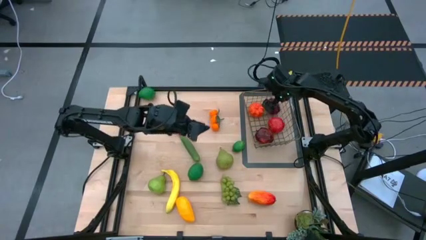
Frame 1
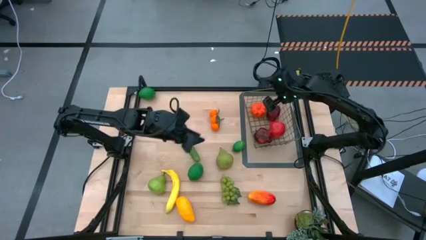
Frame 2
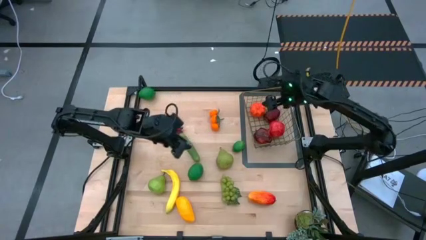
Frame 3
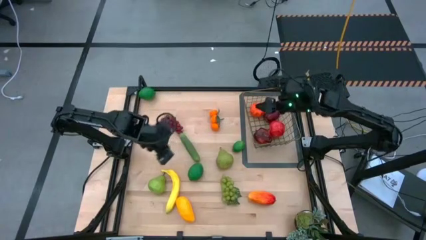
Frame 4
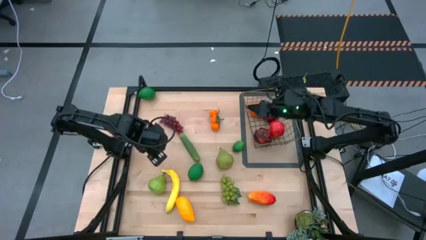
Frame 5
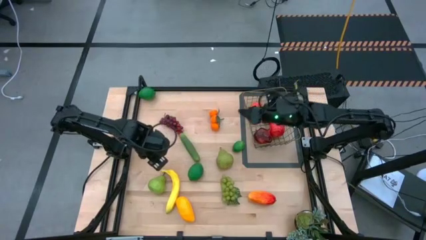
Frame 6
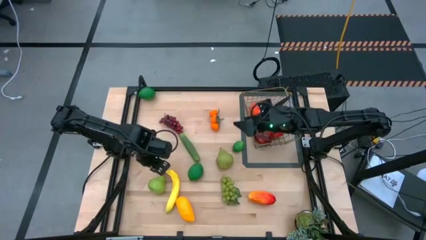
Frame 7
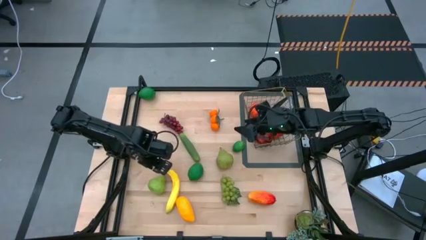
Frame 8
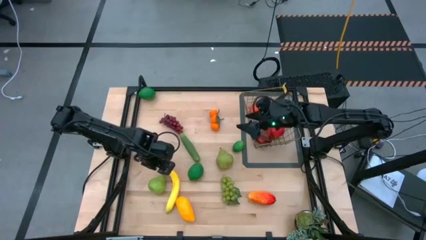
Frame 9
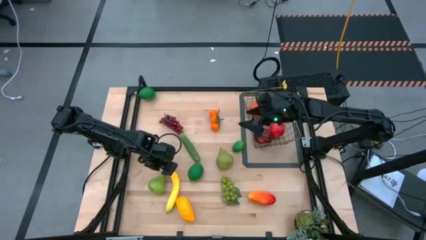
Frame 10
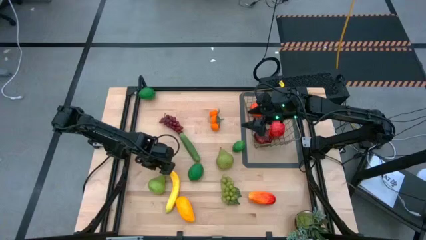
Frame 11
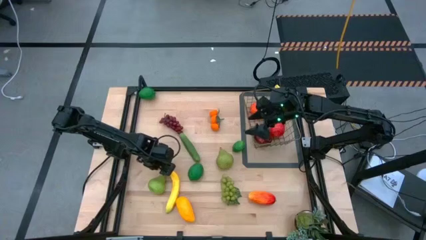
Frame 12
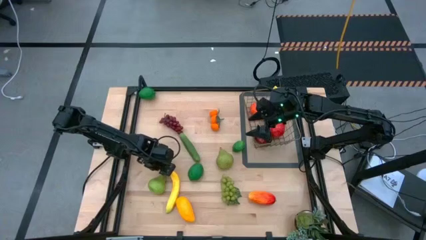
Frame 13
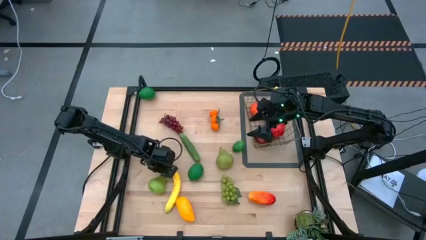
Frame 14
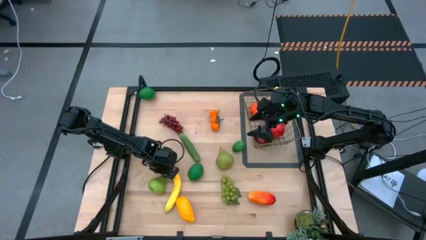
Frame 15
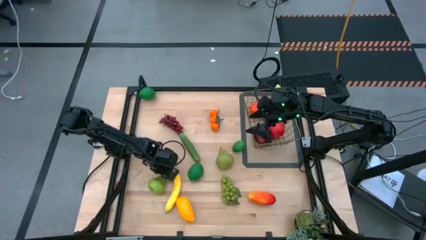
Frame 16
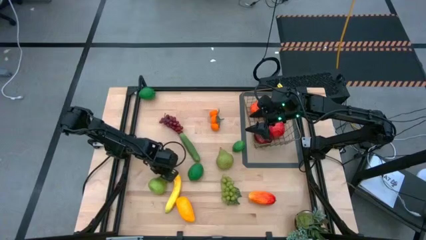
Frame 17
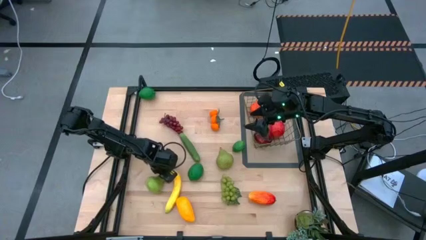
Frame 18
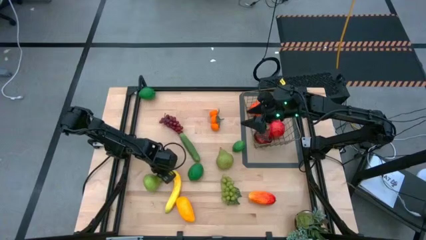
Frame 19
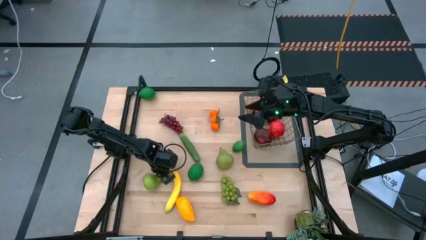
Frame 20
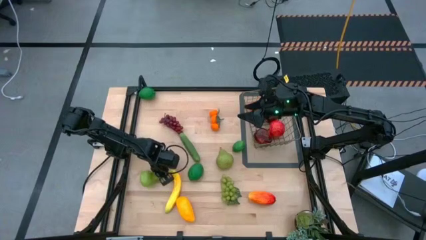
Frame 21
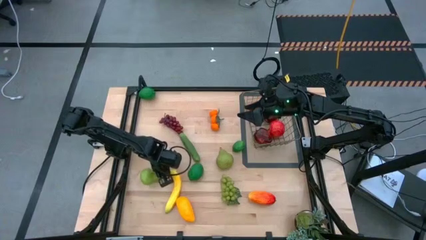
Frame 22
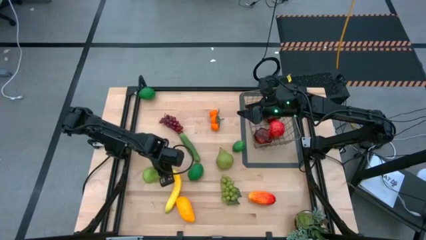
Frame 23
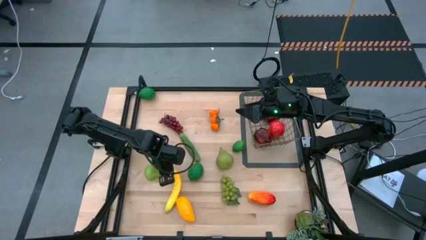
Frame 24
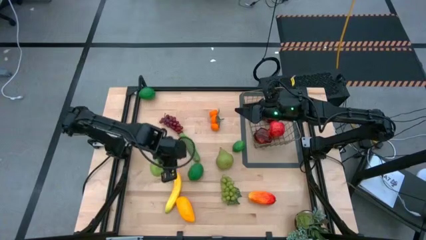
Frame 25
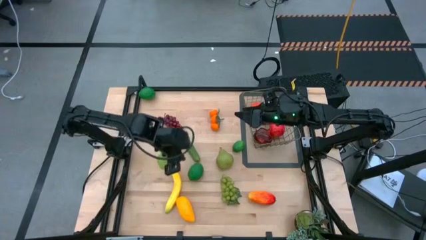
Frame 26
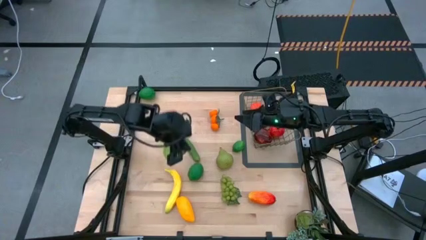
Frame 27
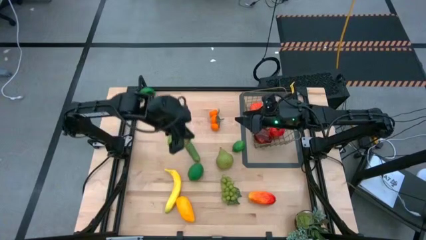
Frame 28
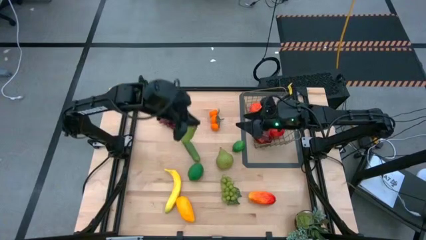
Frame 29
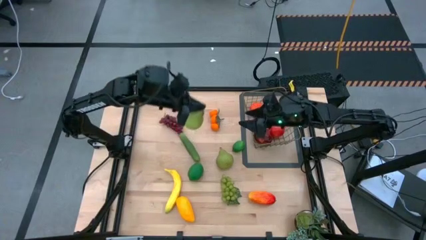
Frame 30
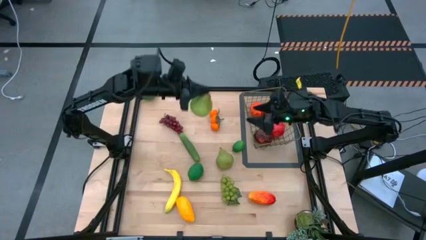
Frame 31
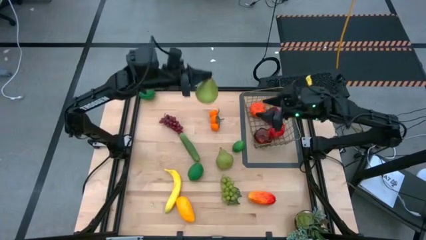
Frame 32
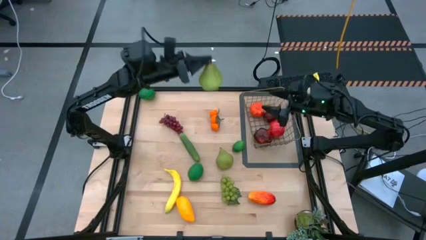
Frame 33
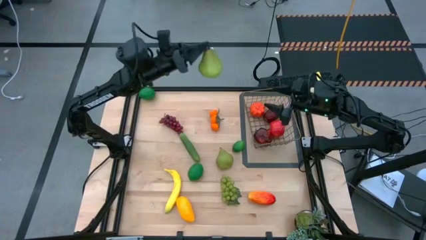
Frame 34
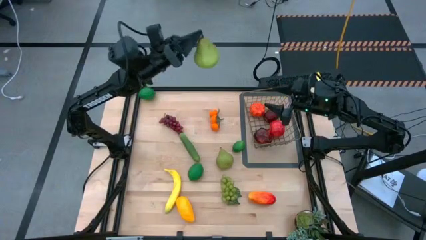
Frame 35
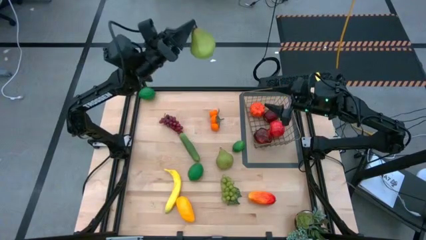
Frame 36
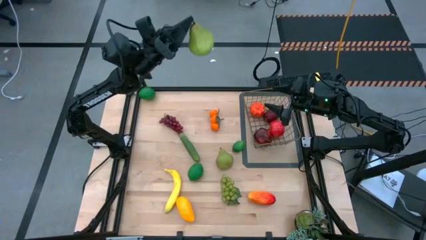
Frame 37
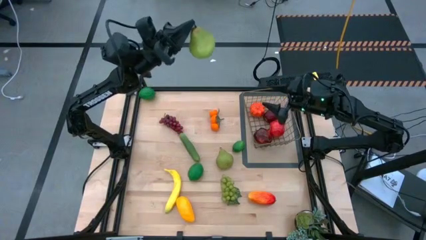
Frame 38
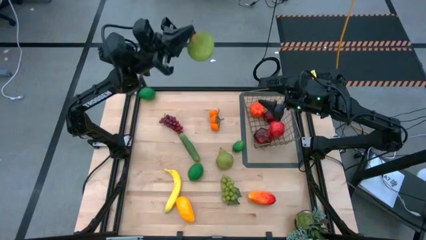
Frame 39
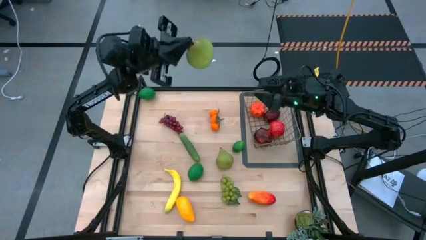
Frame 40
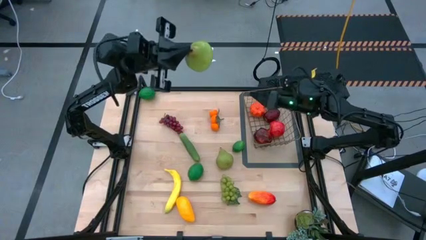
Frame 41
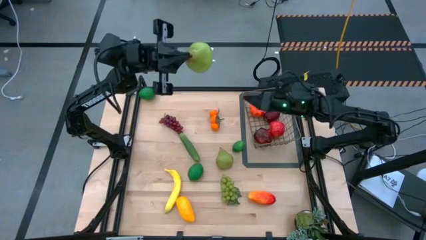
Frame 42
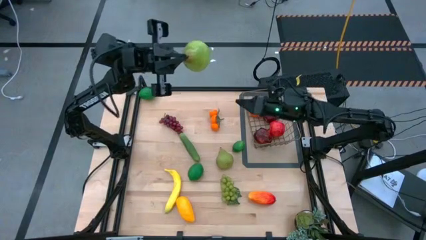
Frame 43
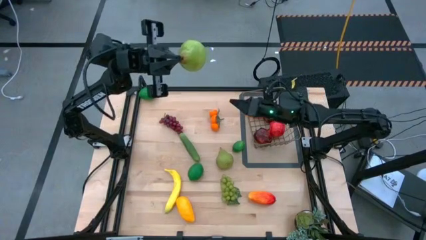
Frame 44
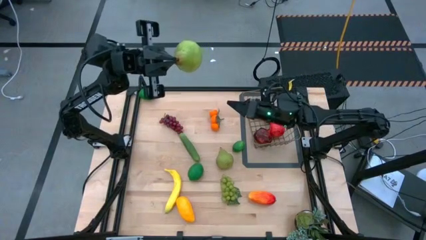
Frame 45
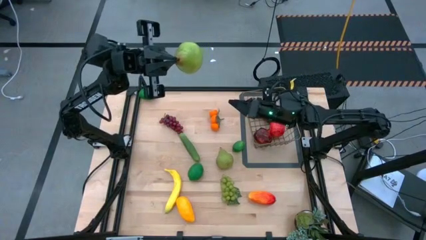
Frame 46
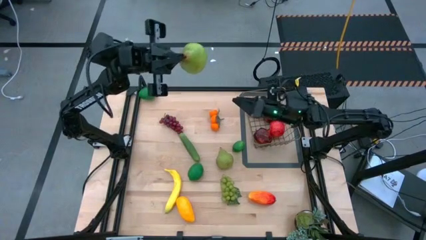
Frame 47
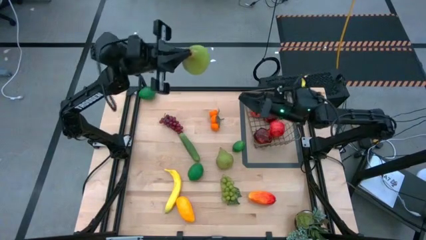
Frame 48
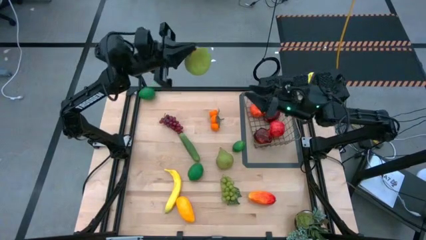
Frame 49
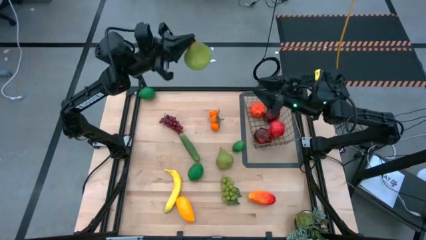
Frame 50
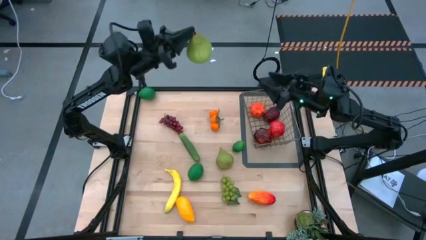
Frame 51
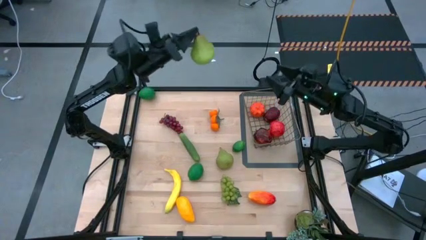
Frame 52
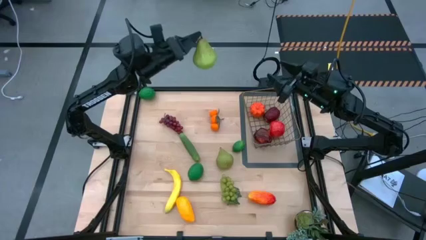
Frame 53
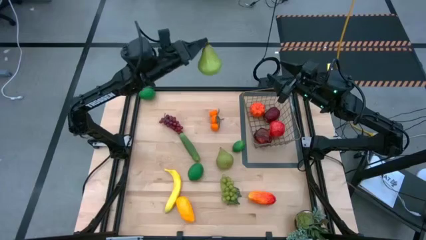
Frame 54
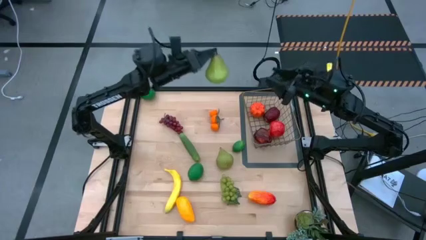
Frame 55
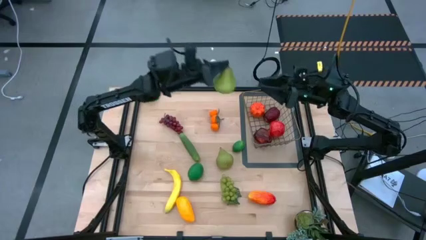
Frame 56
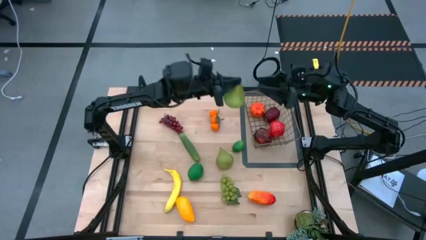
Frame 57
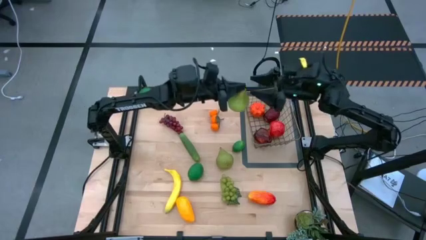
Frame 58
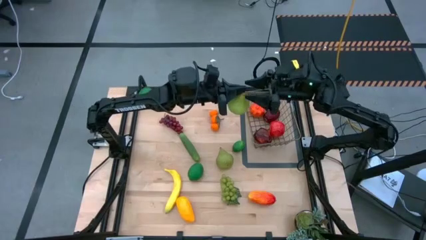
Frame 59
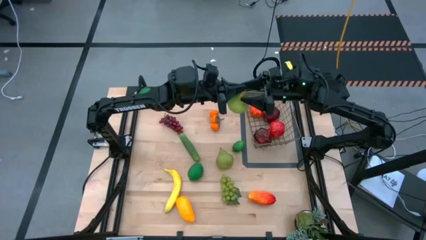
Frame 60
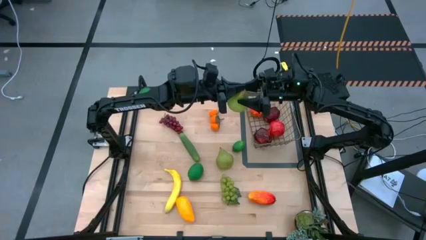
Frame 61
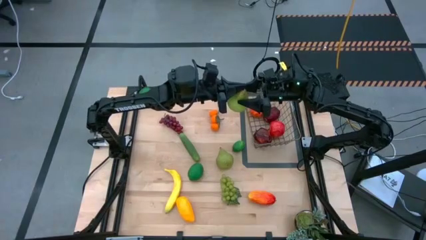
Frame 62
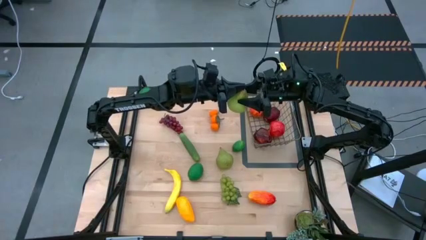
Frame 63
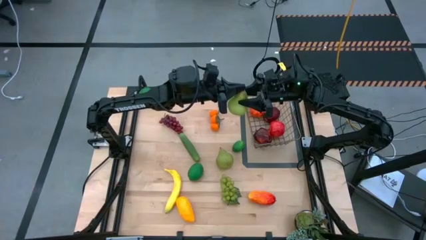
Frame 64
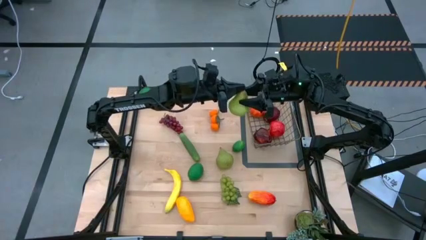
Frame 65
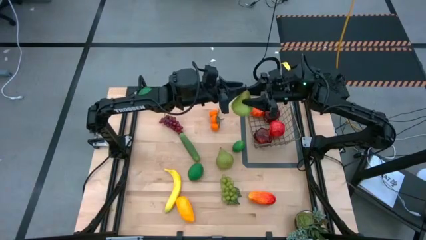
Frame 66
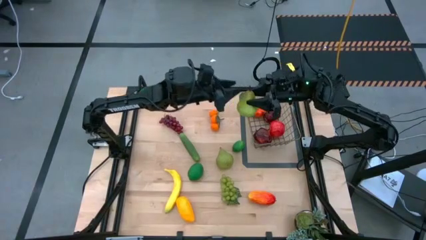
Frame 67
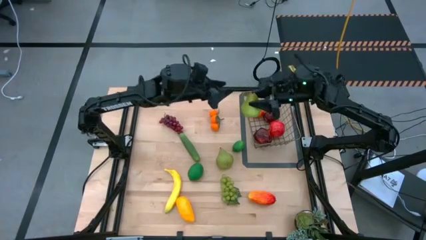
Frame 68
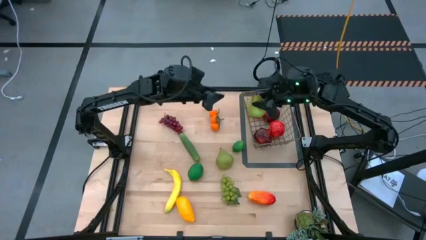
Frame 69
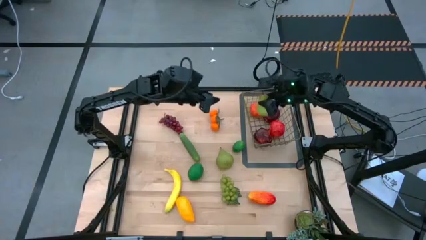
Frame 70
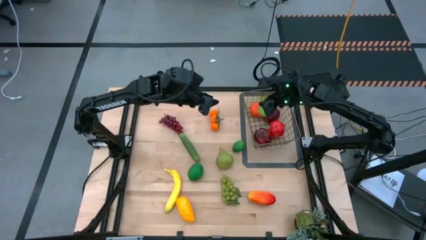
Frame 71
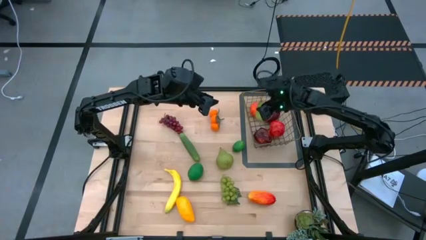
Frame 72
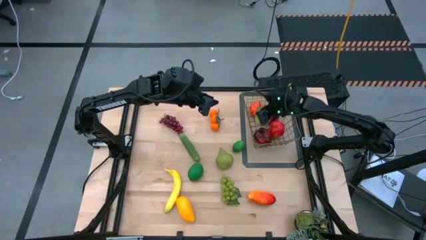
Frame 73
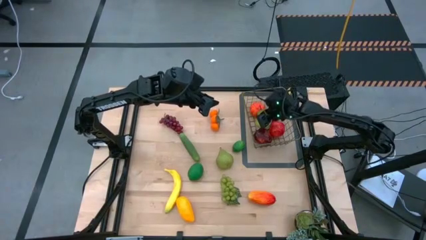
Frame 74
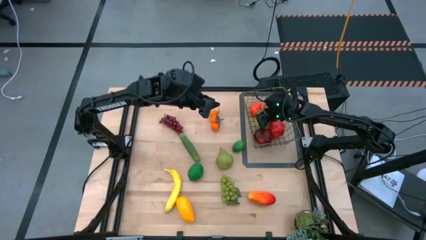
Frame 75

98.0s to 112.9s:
Task: Build produce basket
Put the left green pear into the wire basket

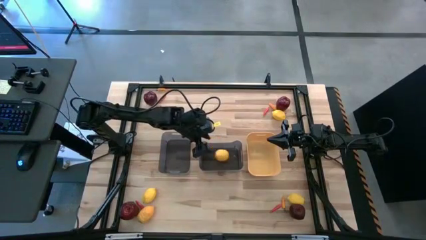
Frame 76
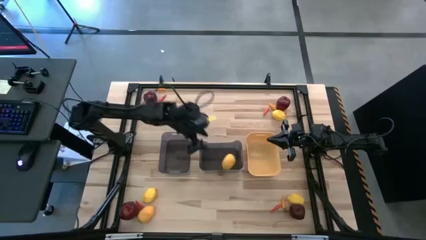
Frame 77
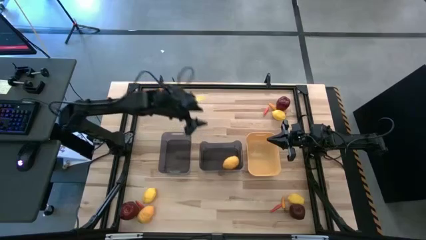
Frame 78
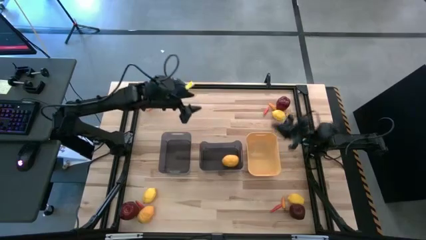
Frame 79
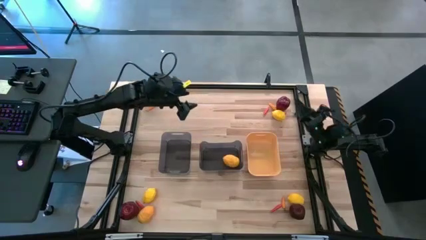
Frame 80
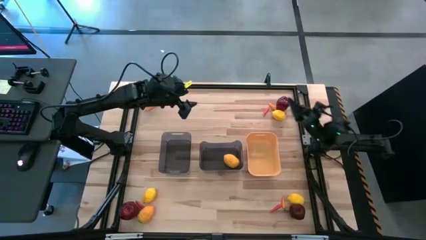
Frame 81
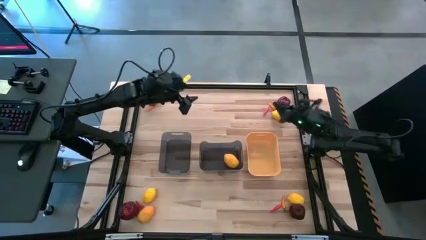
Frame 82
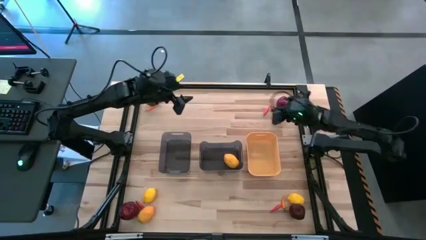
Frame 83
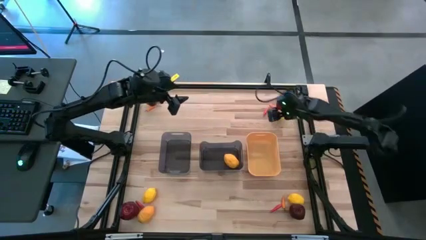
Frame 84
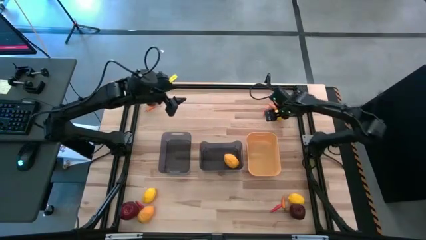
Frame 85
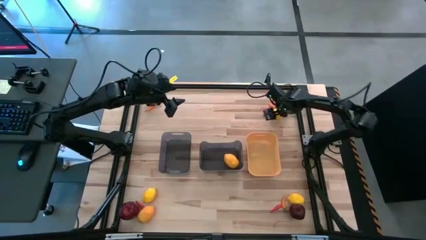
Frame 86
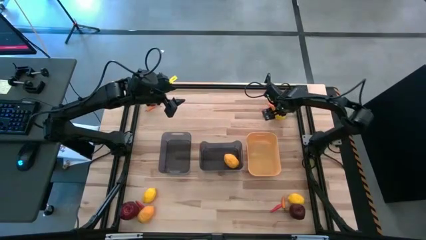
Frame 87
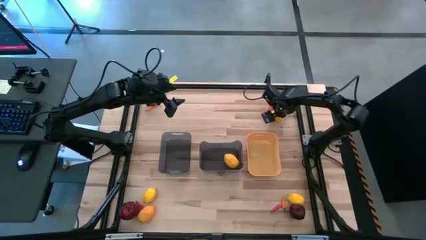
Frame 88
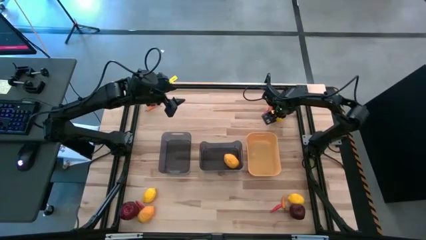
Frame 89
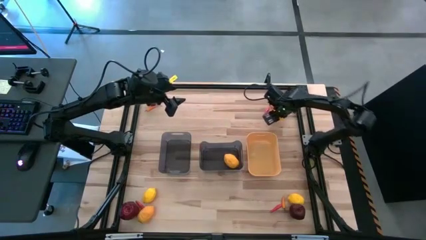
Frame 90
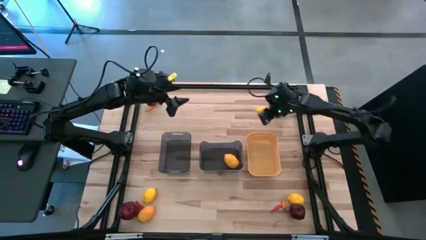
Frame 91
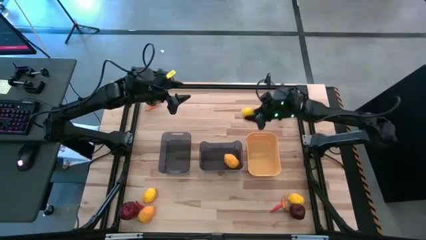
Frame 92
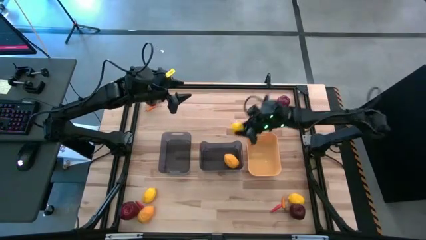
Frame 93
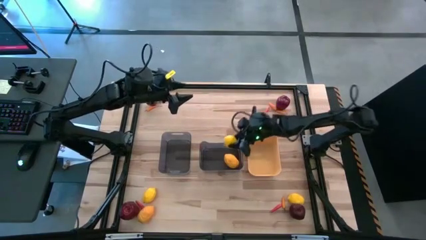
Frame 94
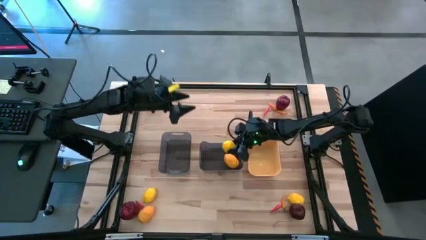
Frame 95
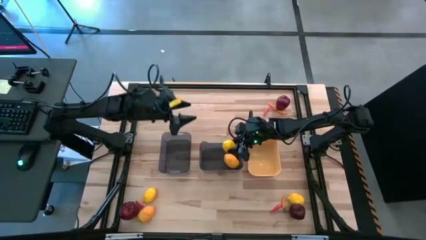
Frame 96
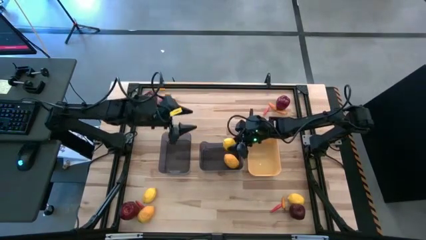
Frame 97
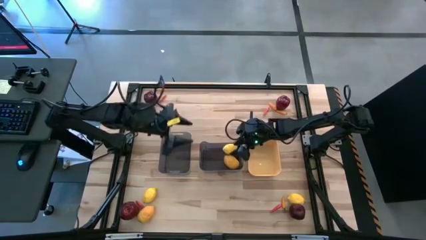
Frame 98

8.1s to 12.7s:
Task: Sort produce into baskets
Put the lemon into the right black bin
